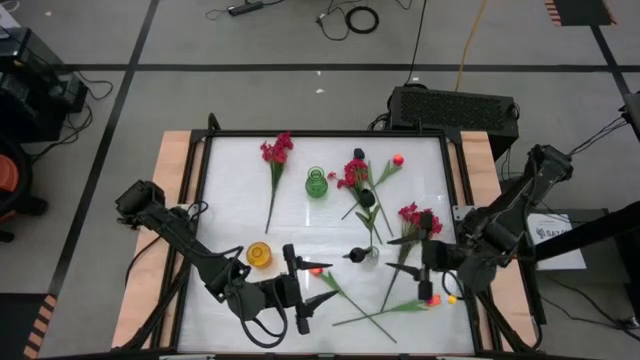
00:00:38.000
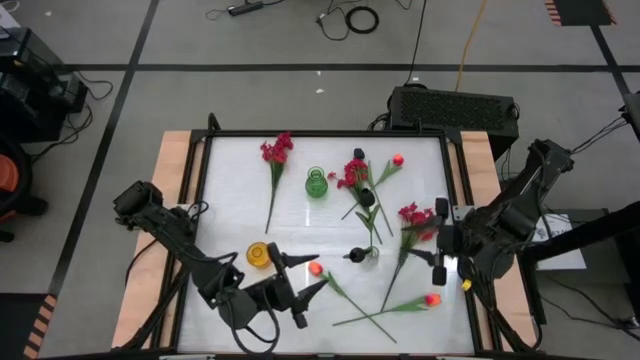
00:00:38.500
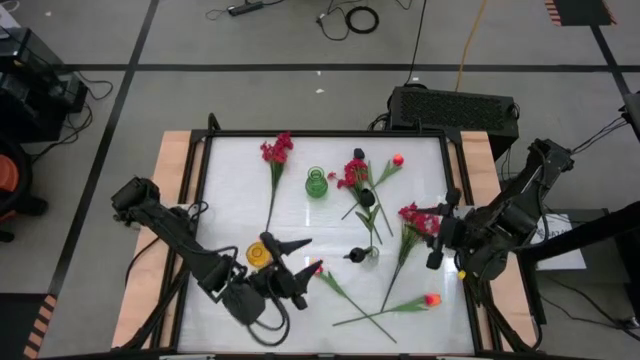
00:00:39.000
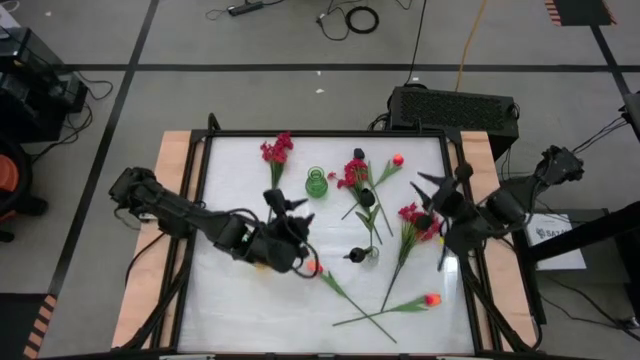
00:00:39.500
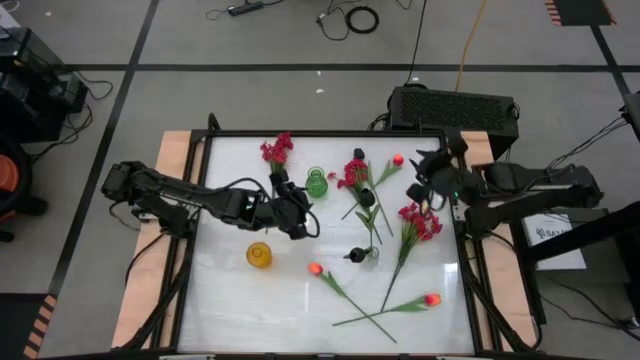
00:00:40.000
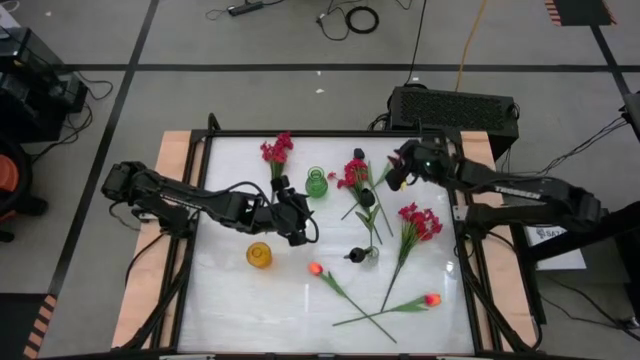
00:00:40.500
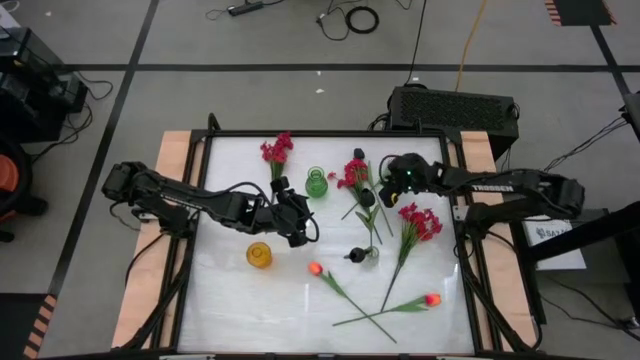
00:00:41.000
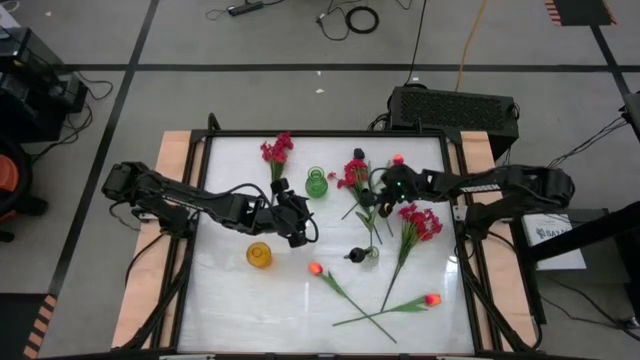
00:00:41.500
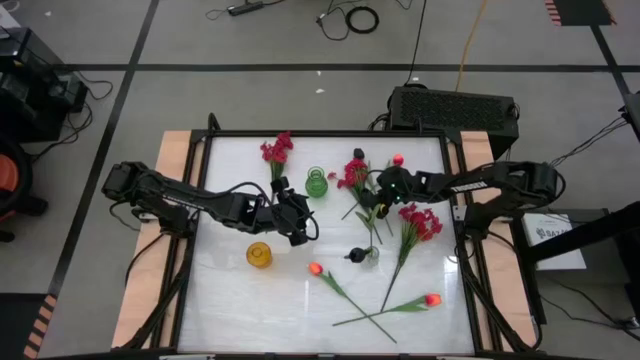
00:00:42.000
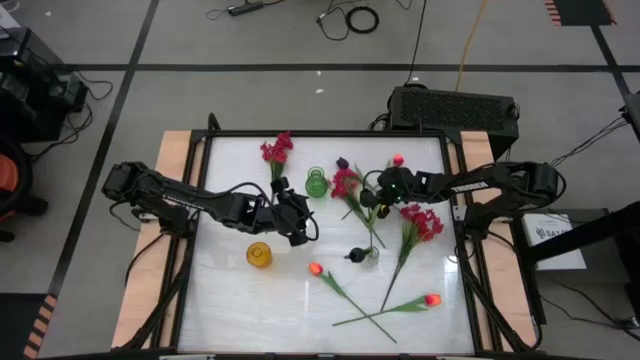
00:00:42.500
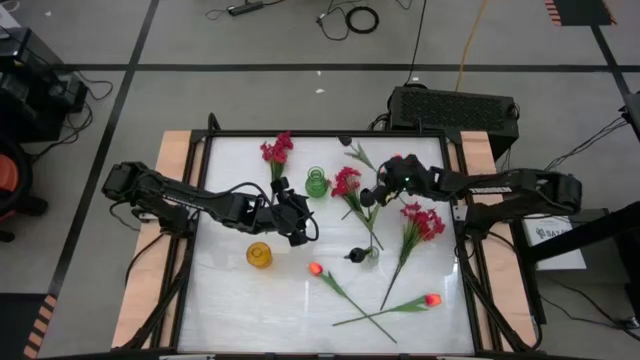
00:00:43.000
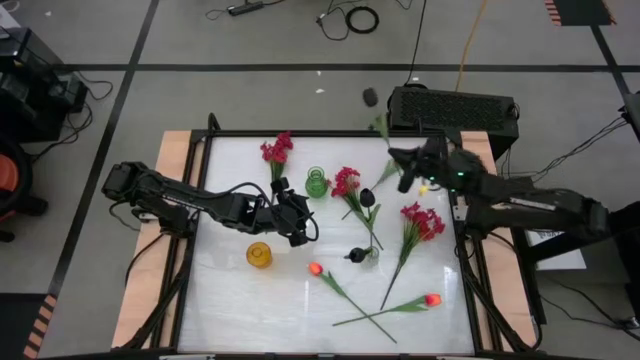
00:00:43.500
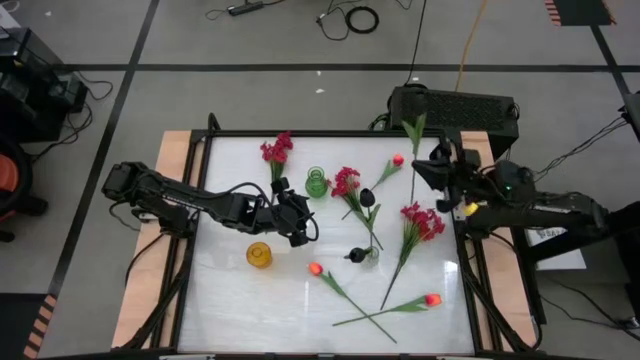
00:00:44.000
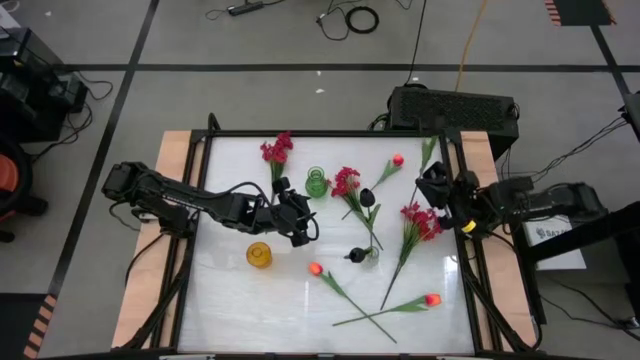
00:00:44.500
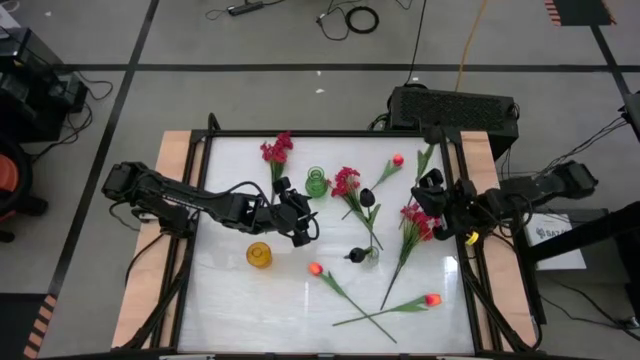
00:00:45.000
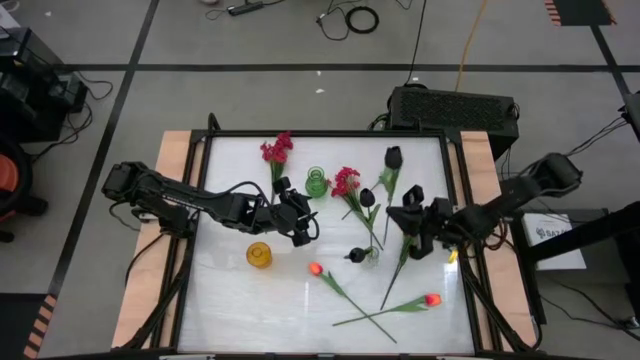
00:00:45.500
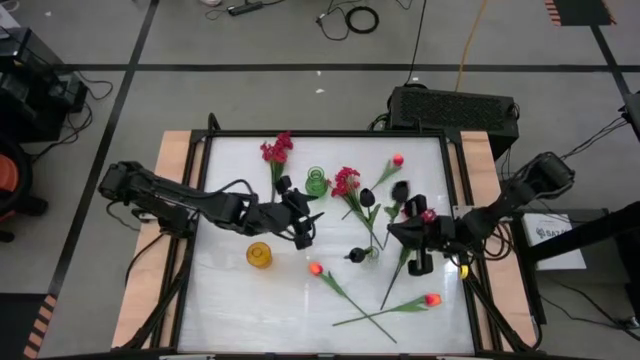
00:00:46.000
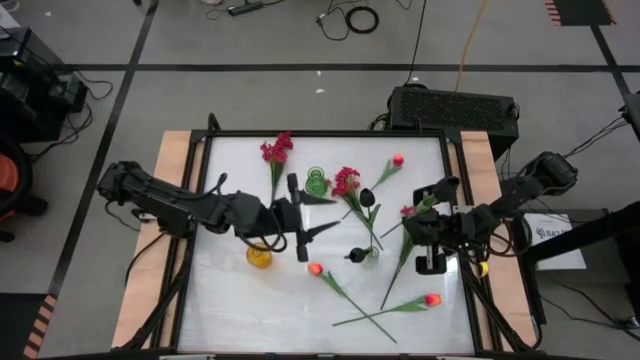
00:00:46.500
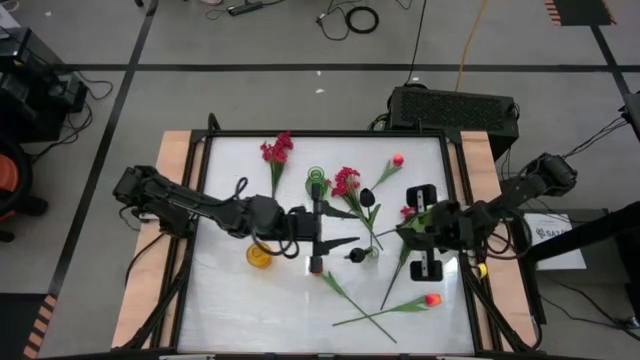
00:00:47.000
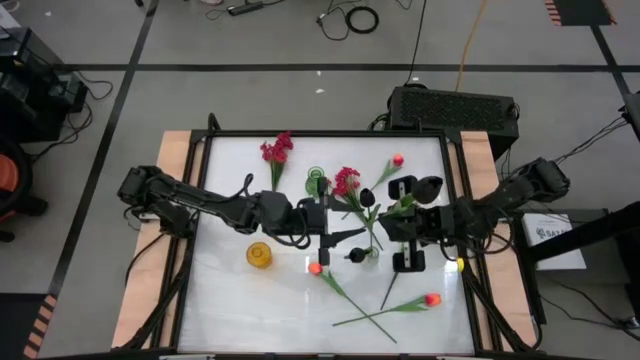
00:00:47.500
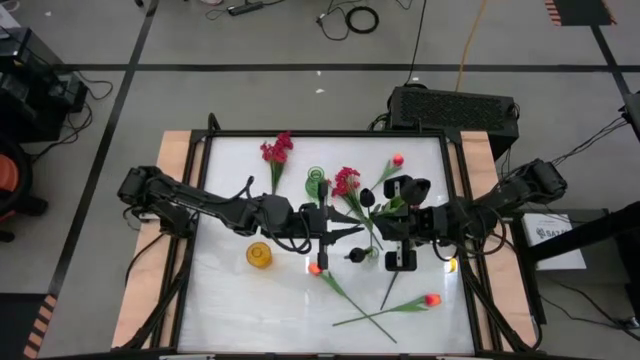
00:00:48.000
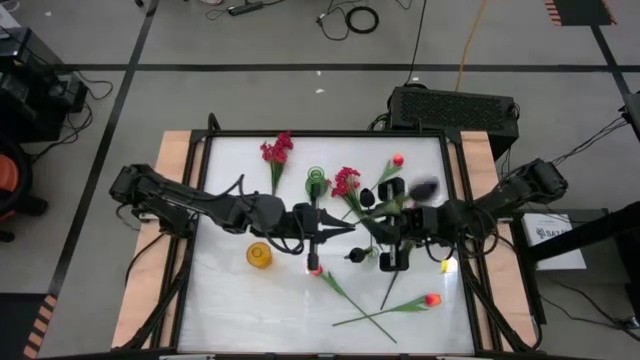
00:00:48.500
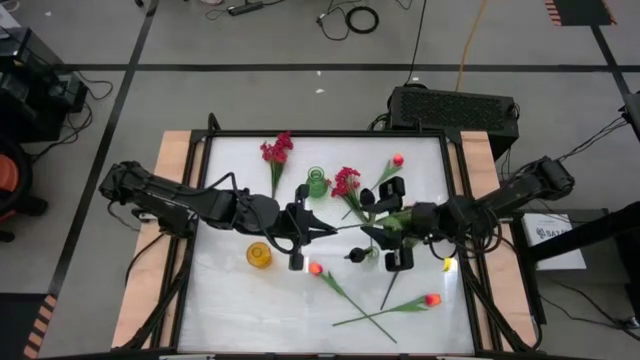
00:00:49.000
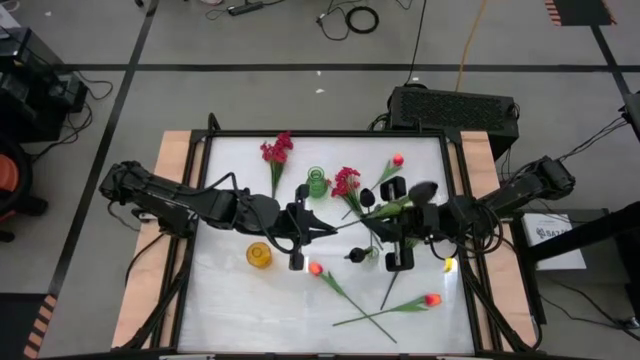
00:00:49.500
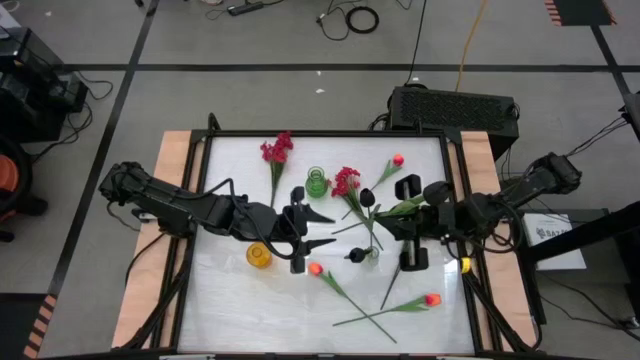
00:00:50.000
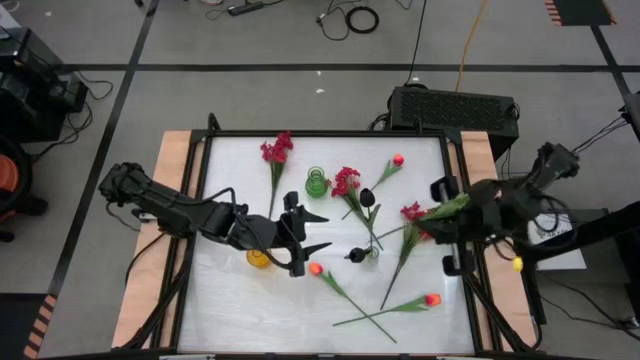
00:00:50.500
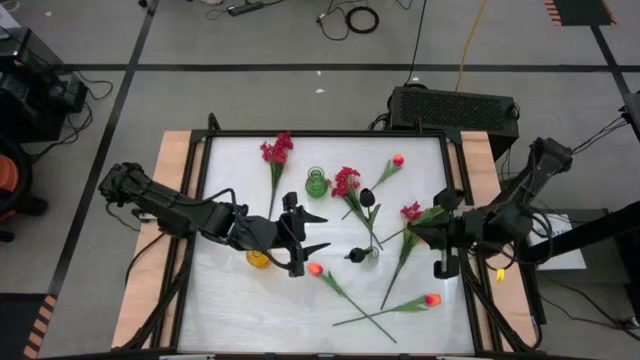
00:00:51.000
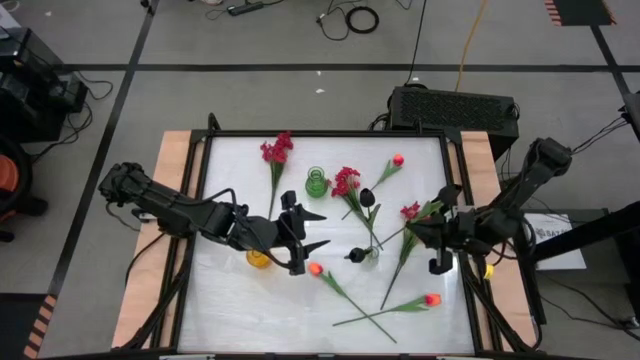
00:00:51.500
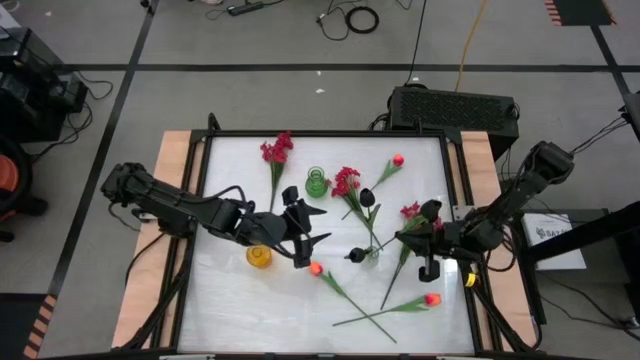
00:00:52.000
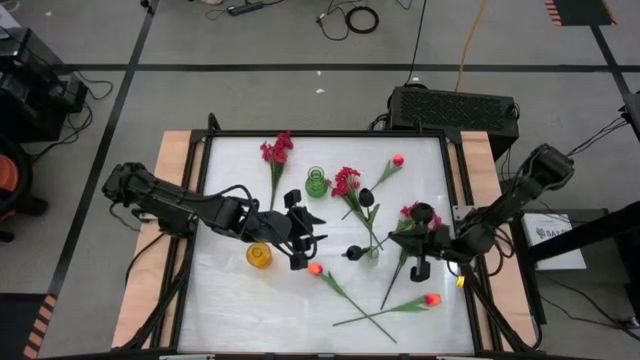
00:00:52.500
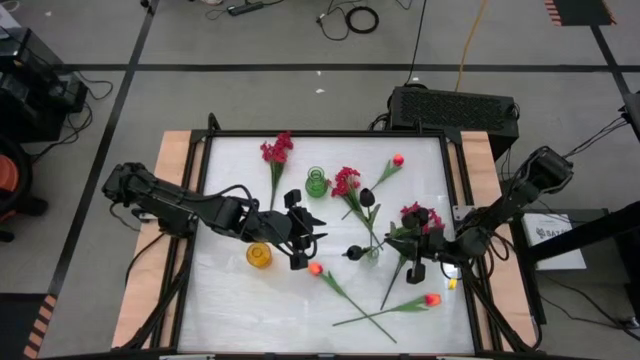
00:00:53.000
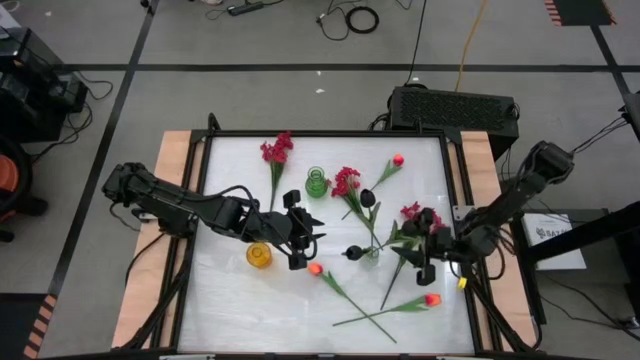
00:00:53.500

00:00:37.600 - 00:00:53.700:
Task: Sort flowers into vase by color
Put the black flower into the transparent vase

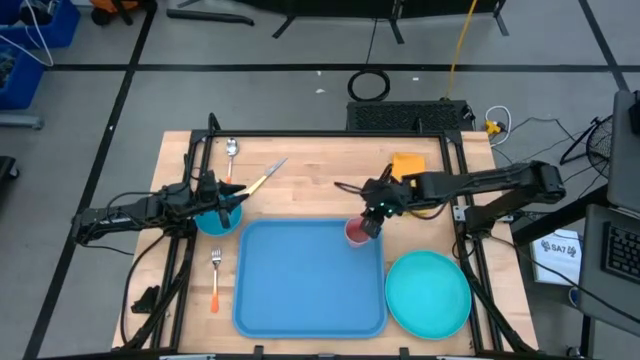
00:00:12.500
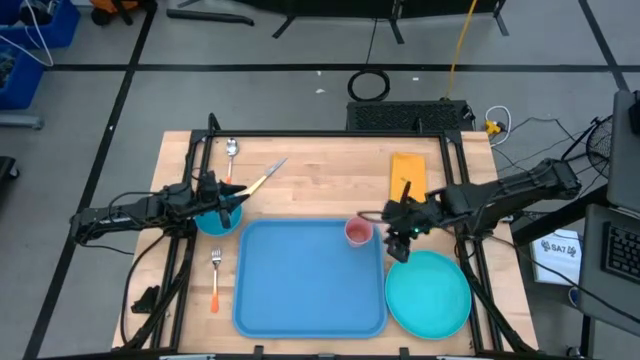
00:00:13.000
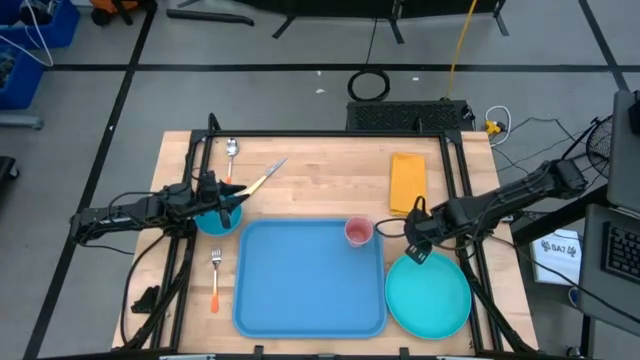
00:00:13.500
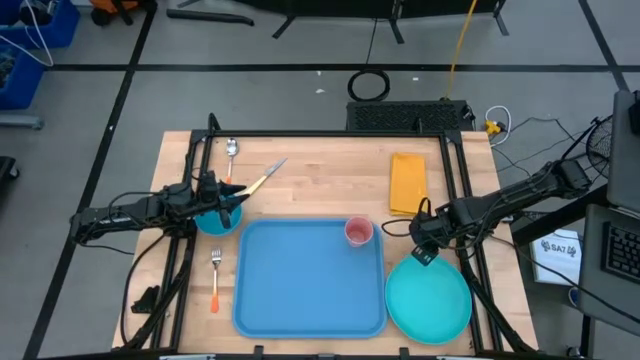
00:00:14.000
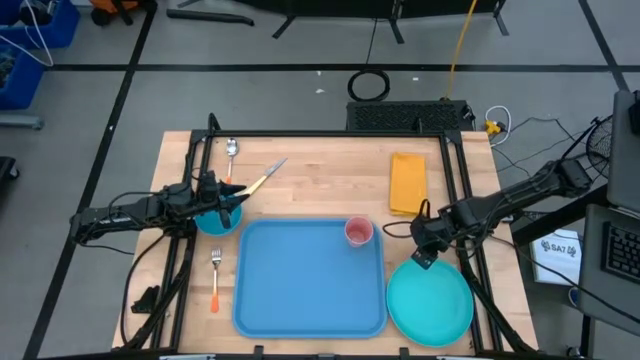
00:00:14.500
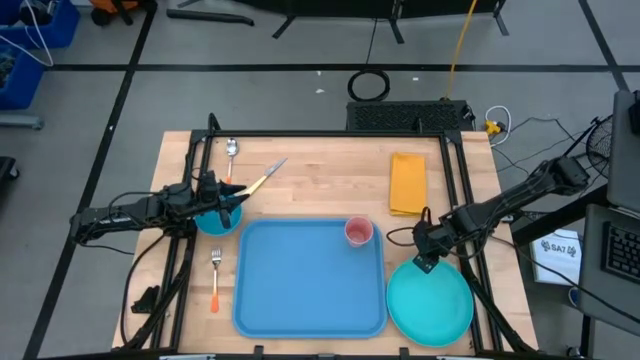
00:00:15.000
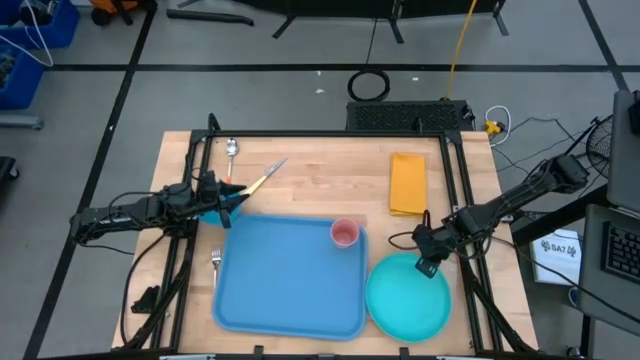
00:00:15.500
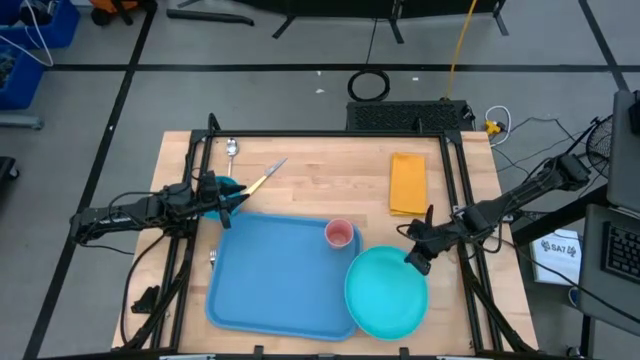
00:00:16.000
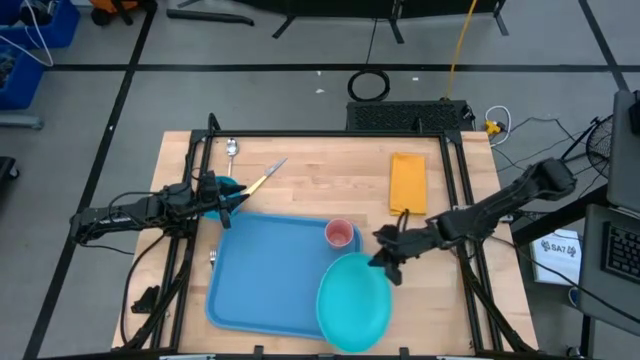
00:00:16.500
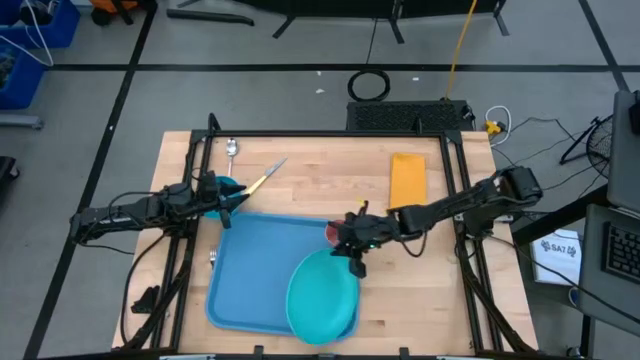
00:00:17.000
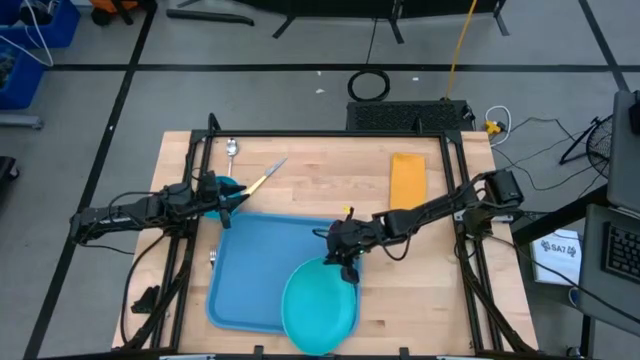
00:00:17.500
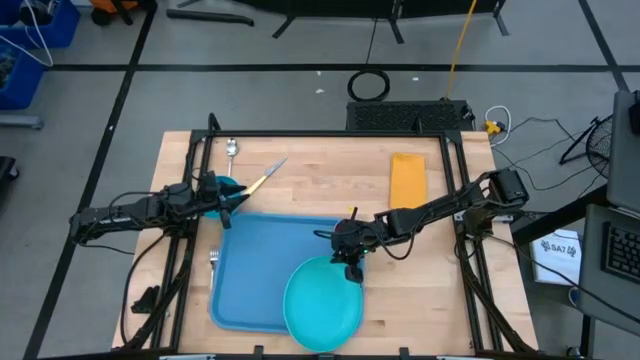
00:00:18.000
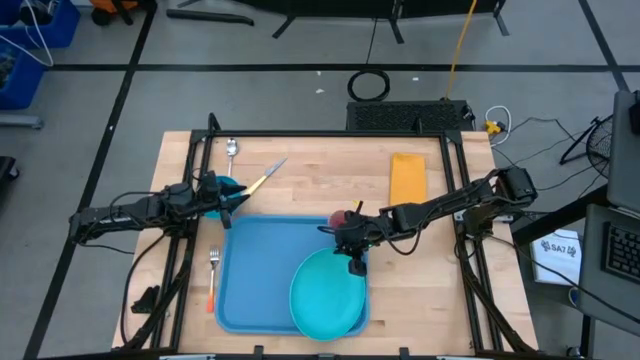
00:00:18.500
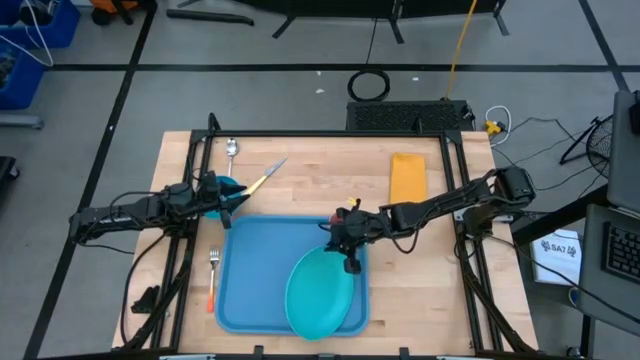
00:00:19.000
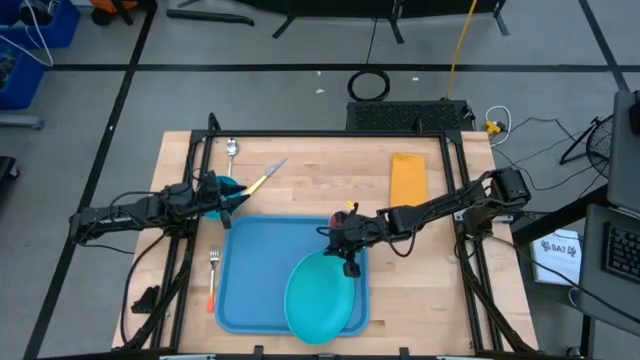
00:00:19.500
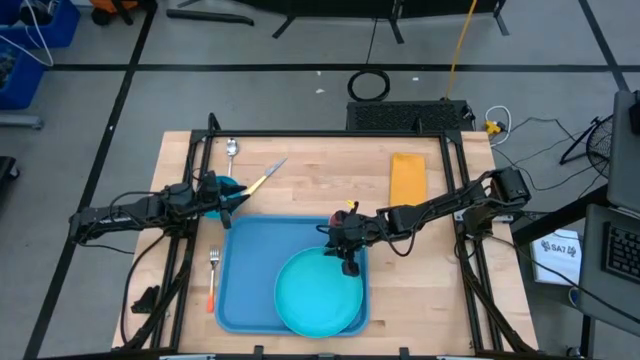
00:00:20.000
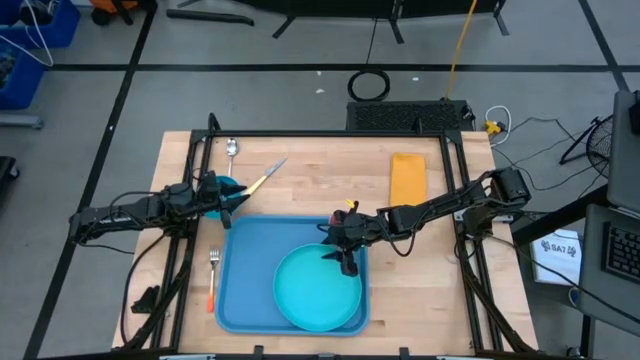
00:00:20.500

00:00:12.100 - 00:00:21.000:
Task: Set up tray
Put the light green plate on the blue serving tray to the bottom left of the pink cup
